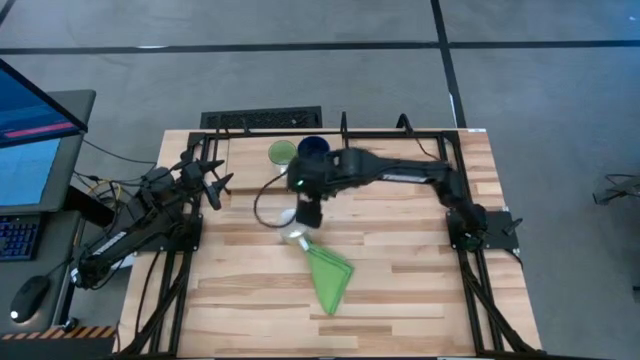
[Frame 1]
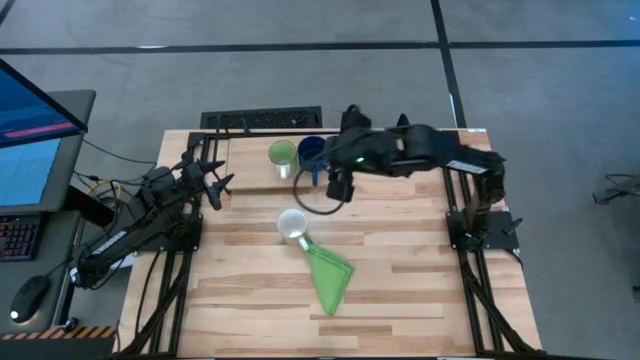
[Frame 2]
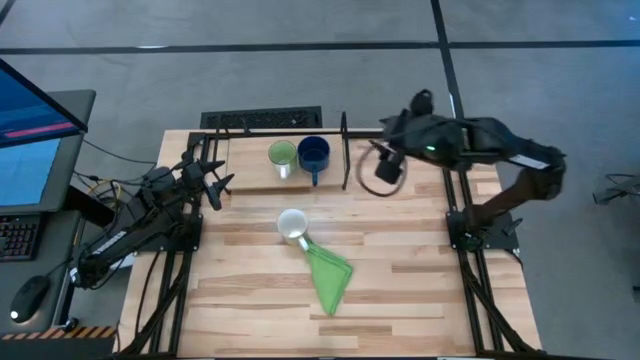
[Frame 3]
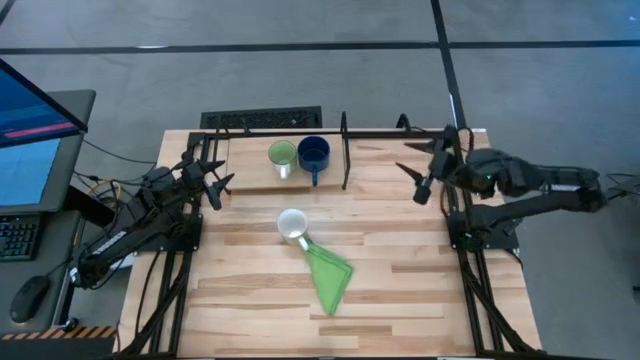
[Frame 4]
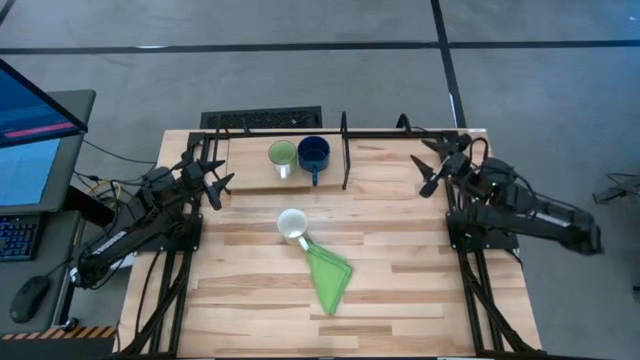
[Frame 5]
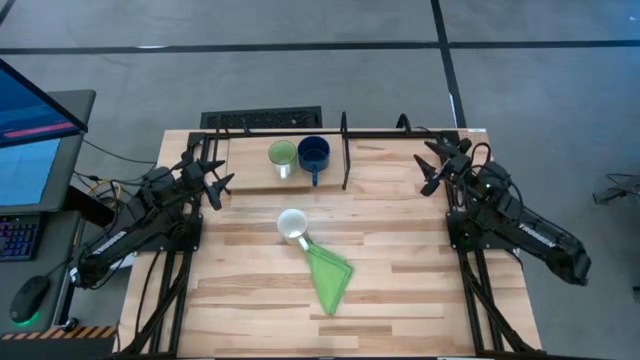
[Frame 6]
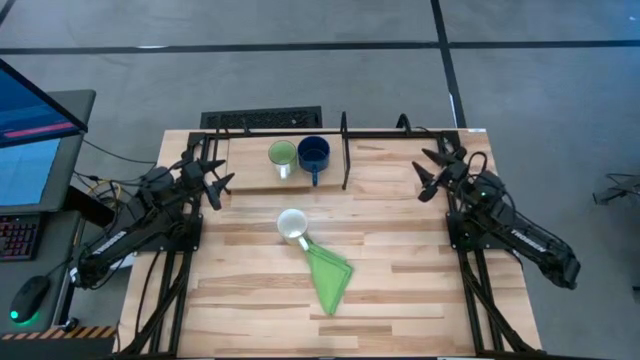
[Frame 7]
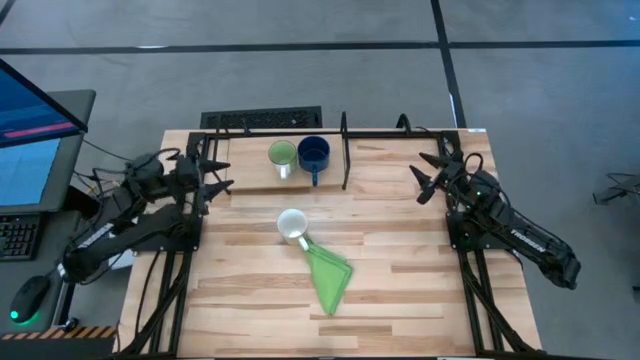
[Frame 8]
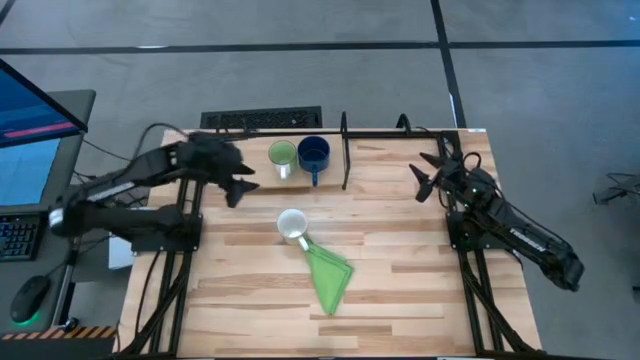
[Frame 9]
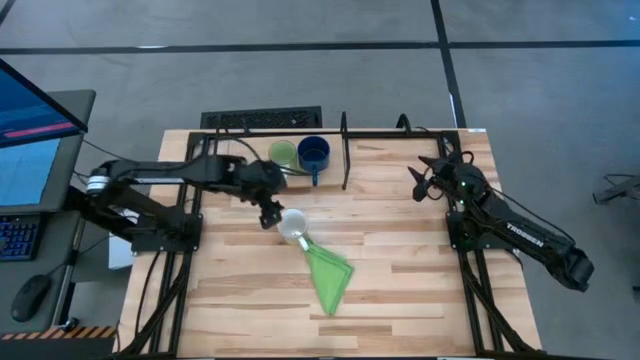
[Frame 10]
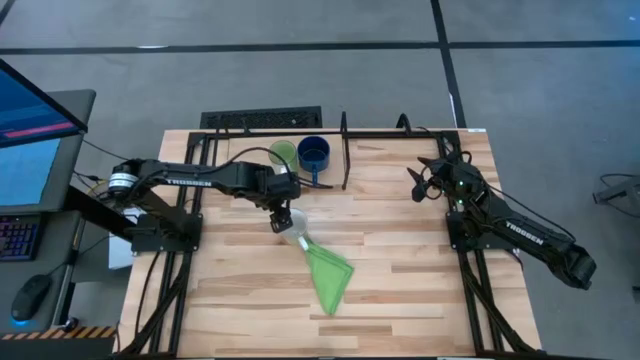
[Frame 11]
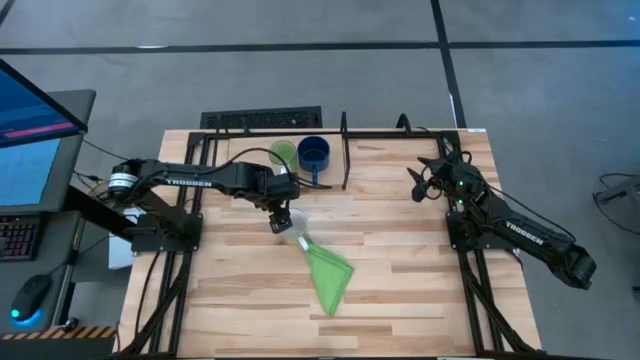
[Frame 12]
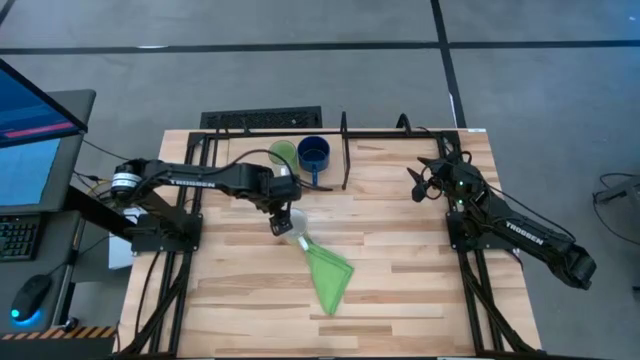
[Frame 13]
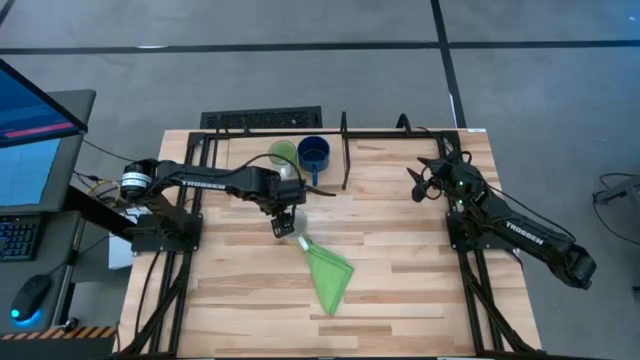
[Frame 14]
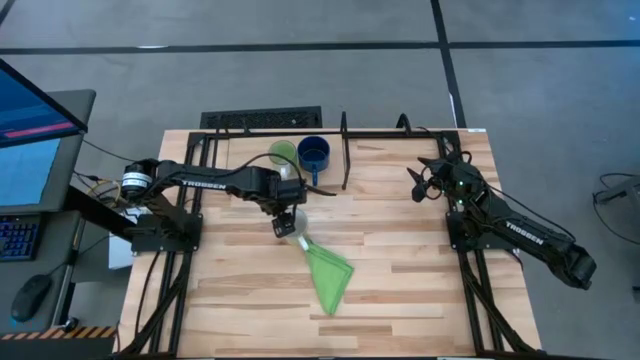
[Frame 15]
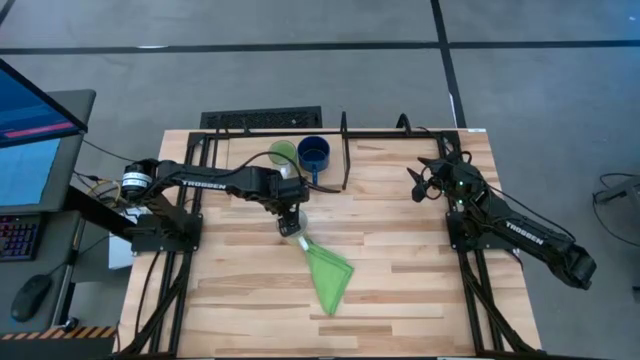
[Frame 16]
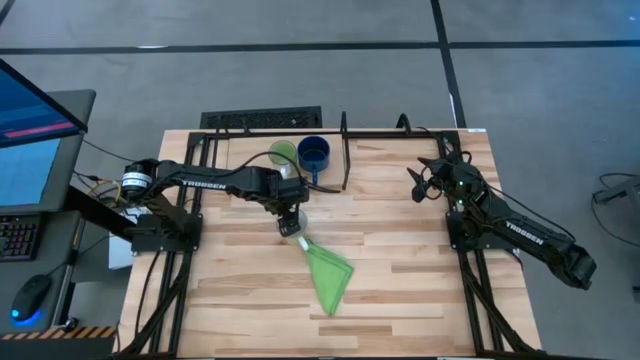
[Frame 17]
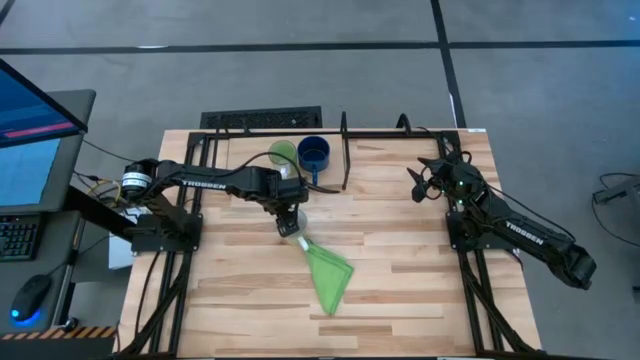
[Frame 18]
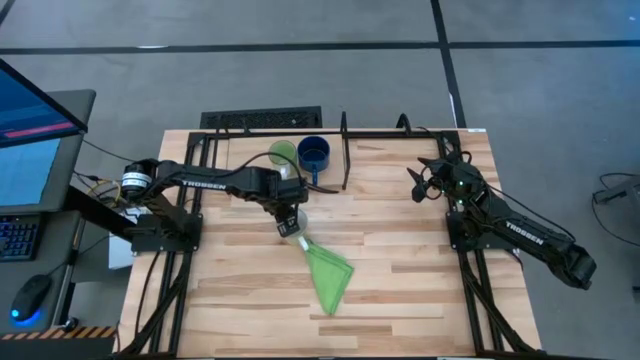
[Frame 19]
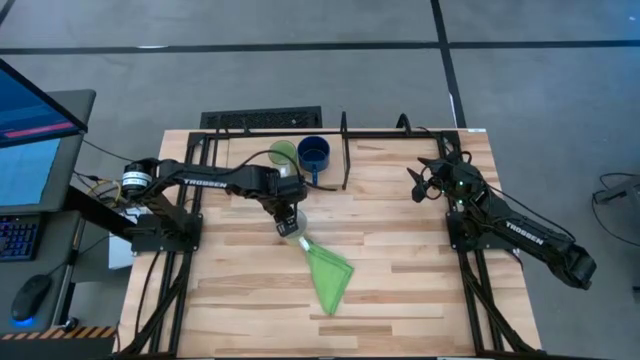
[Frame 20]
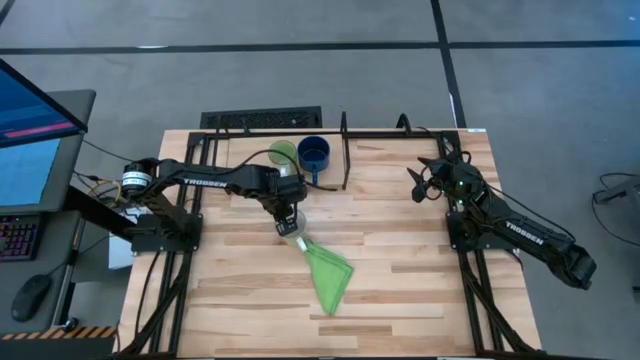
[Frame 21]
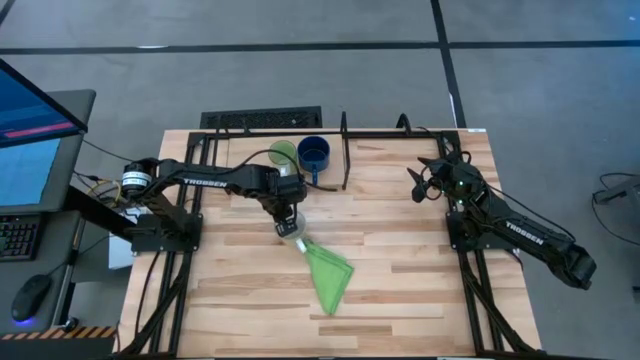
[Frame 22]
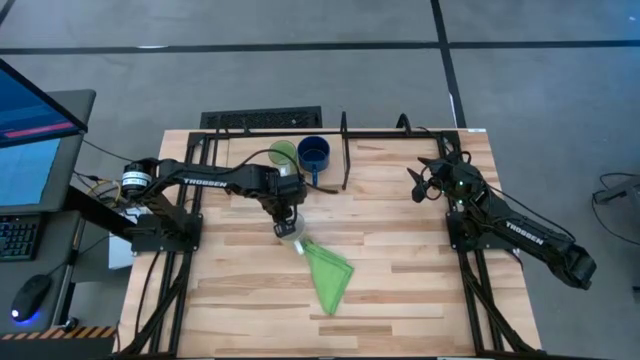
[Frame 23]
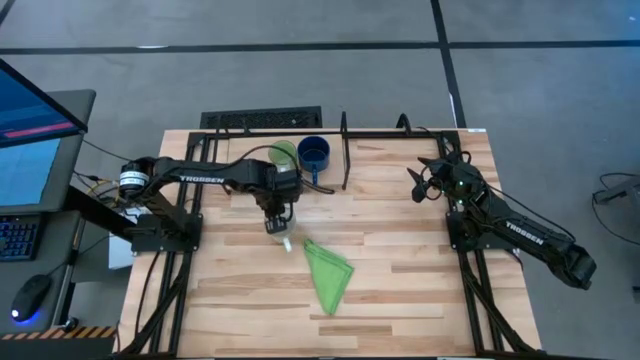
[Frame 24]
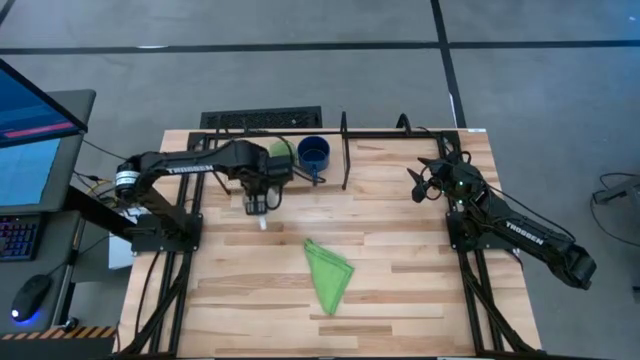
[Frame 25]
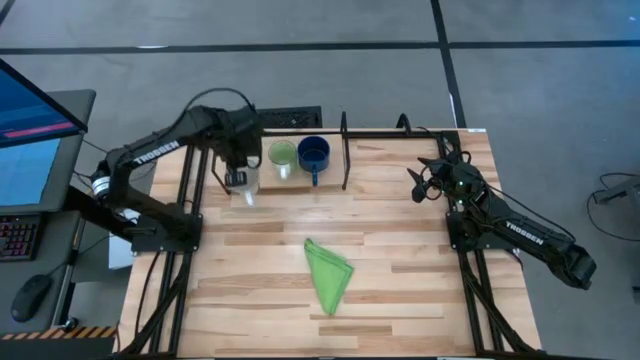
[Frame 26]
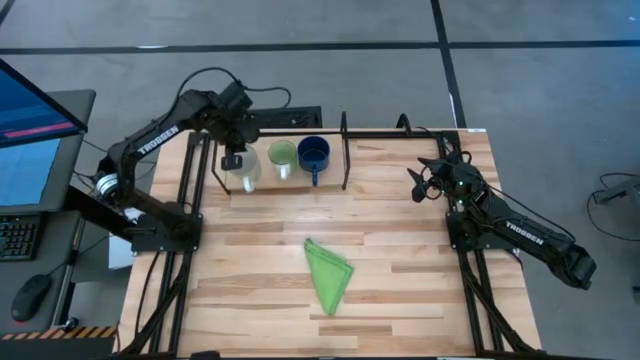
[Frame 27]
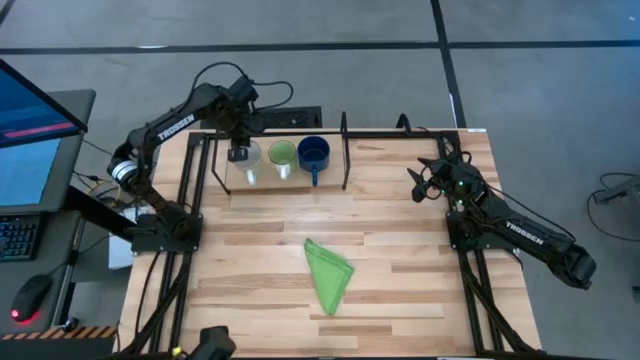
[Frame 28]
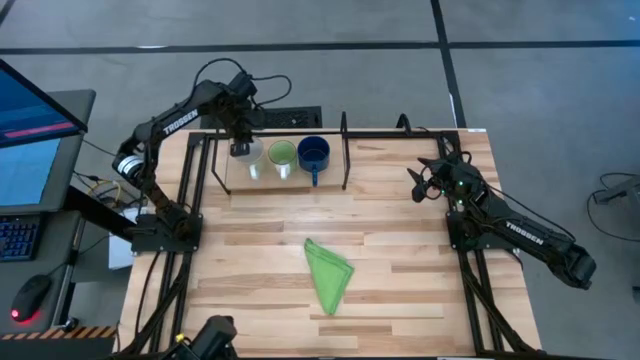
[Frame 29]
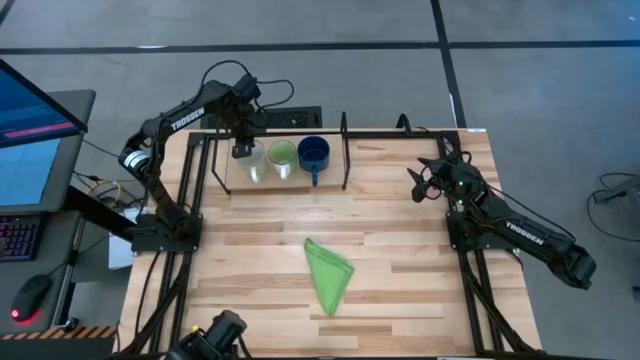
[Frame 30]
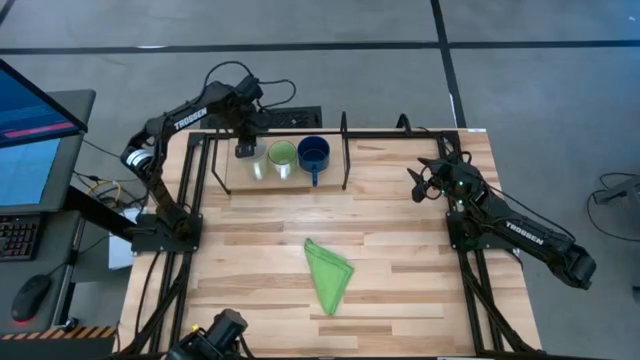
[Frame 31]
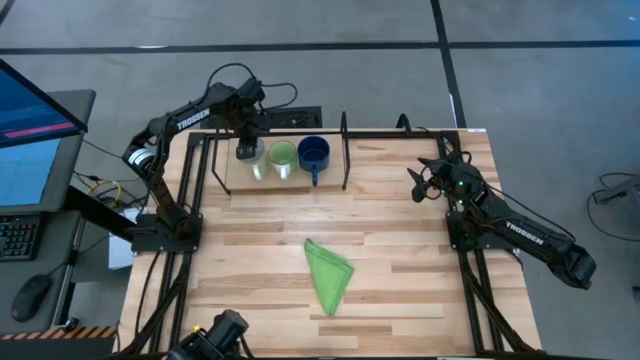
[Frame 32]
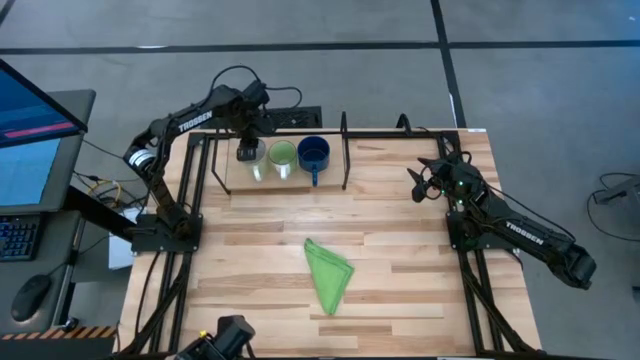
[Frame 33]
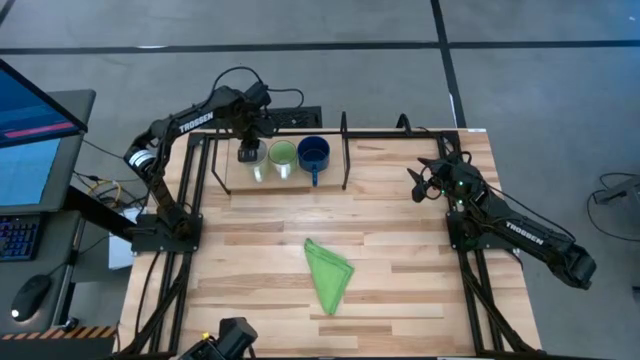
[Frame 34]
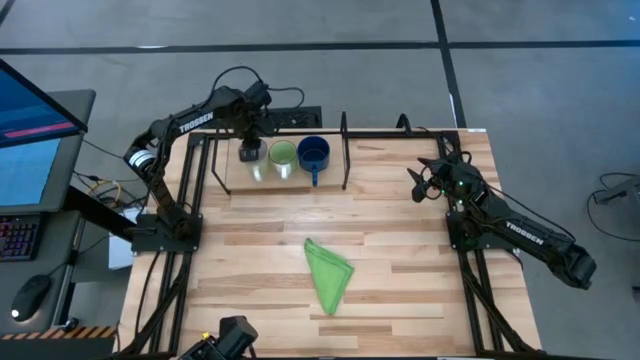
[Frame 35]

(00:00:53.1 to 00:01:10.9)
Task: Stack small to large cups/mugs on shelf
Put the white mug on the shelf

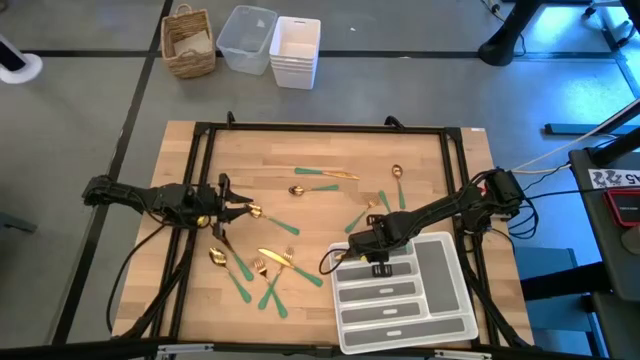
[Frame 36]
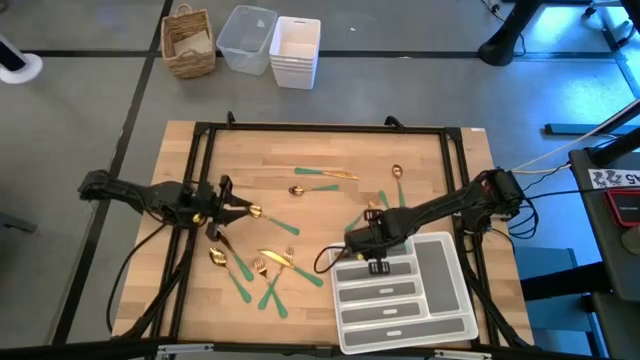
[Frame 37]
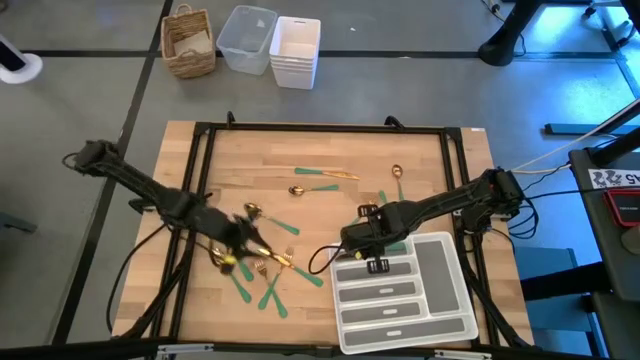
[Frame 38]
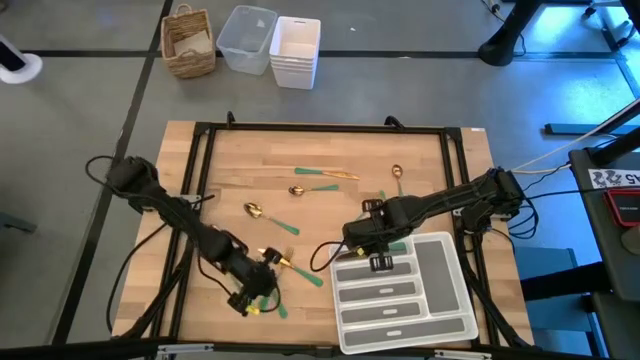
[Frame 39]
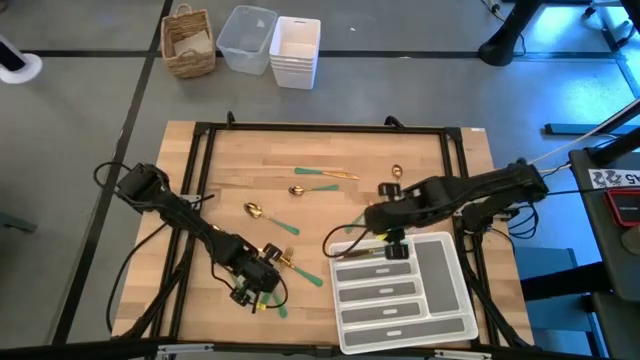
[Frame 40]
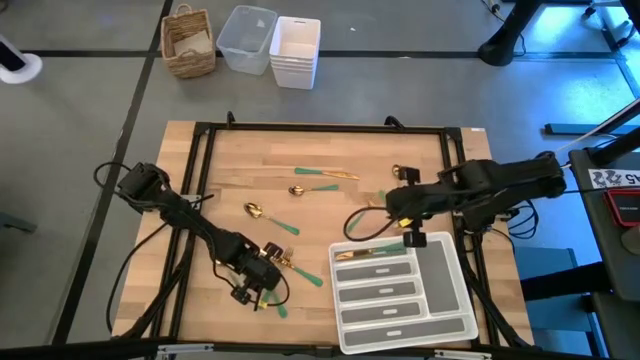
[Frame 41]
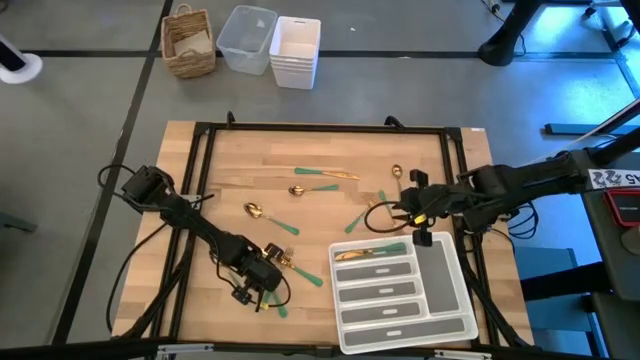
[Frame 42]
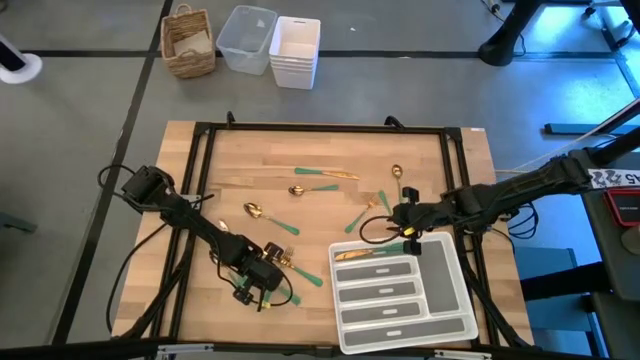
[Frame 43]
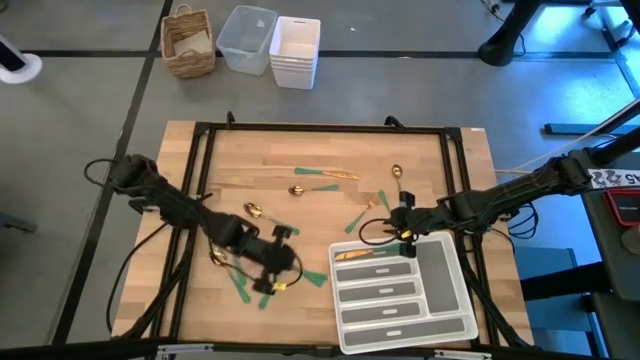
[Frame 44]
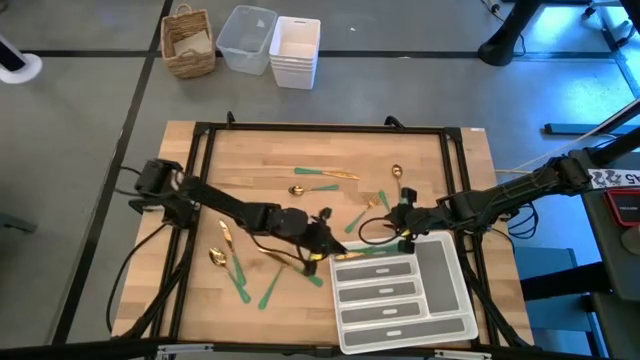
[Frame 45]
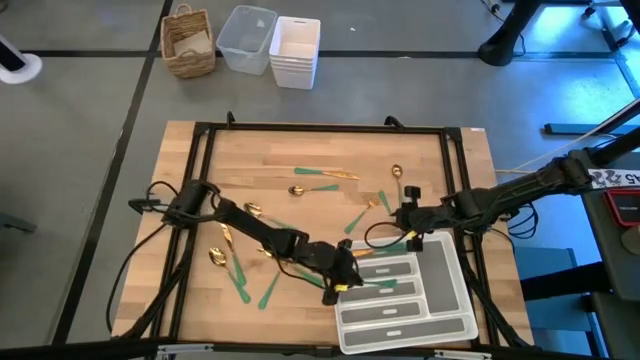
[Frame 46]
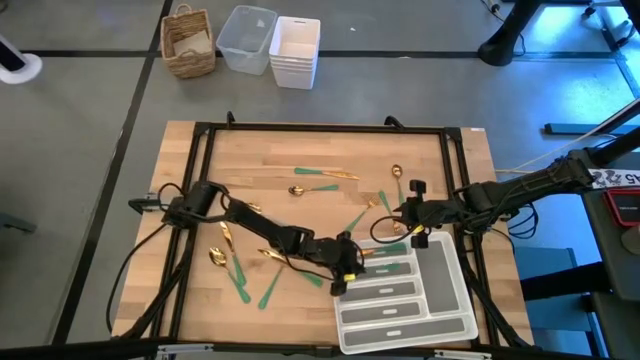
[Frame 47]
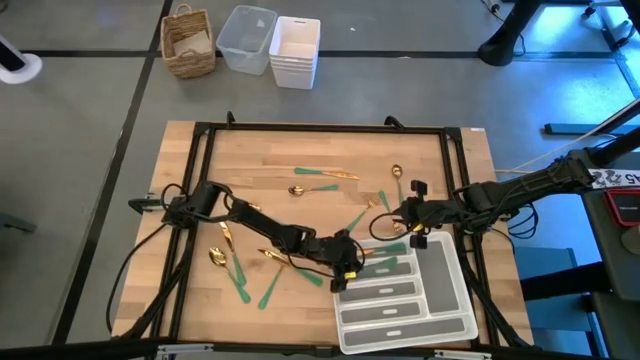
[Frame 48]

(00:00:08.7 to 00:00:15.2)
Task: Sort silverware
Put the bottom left green fork into the silverware tray
